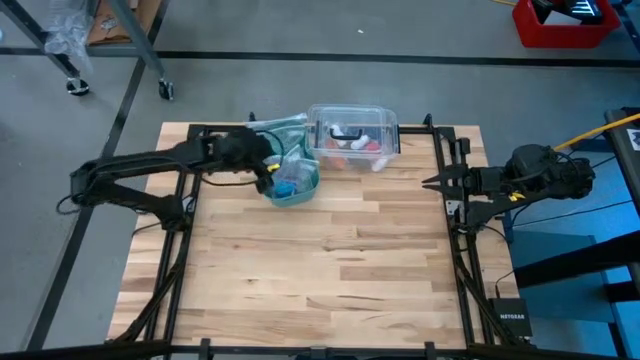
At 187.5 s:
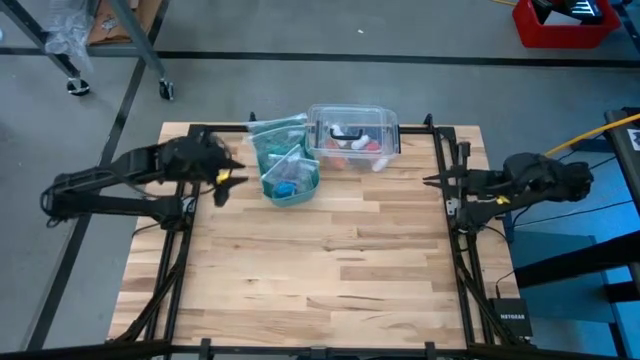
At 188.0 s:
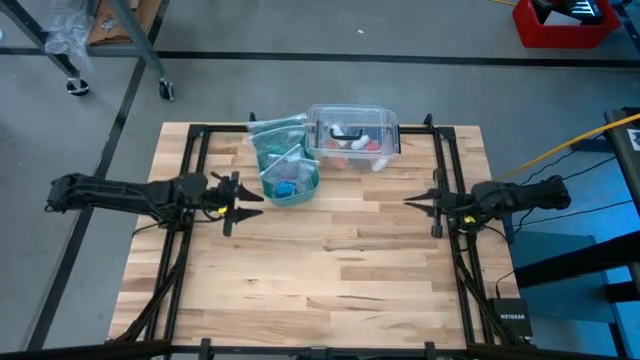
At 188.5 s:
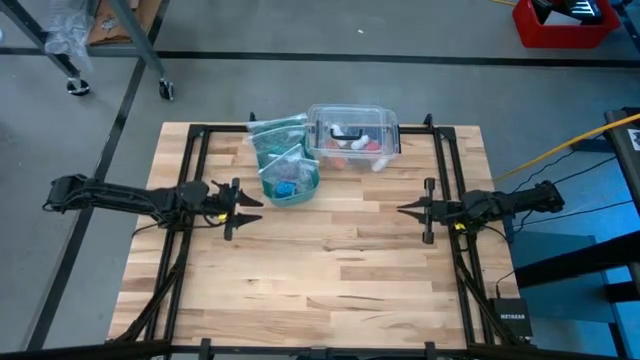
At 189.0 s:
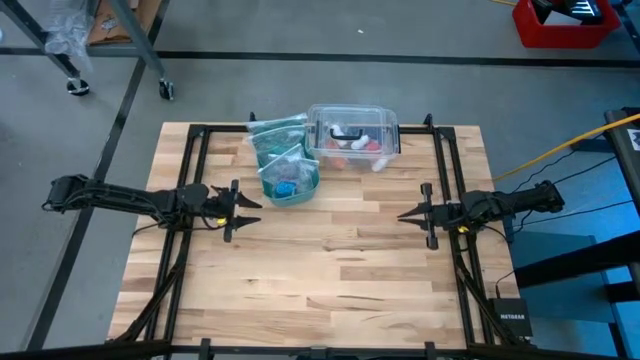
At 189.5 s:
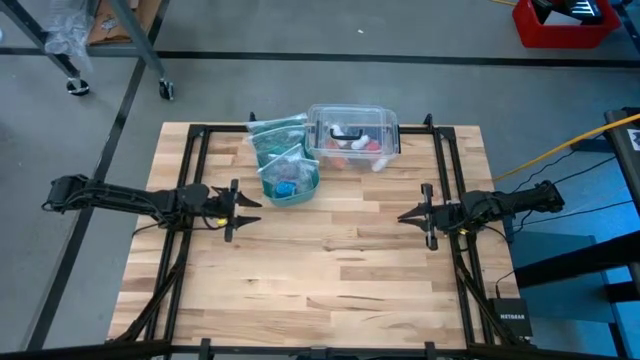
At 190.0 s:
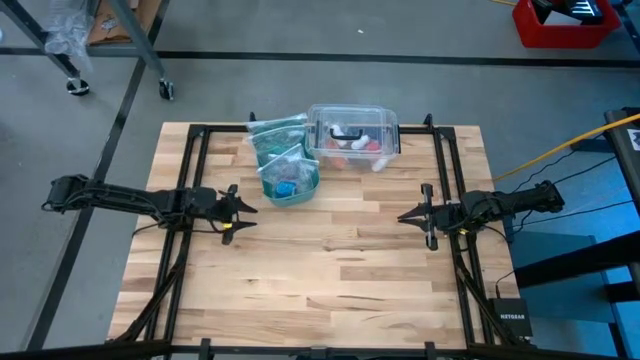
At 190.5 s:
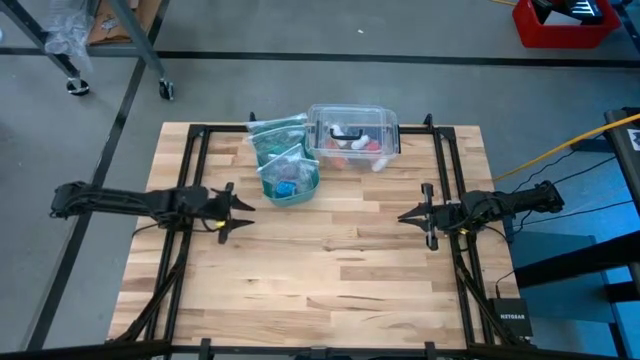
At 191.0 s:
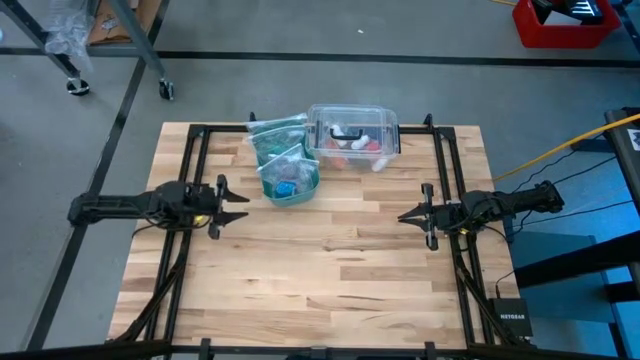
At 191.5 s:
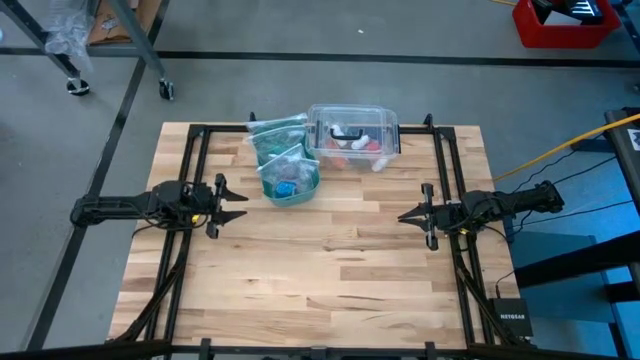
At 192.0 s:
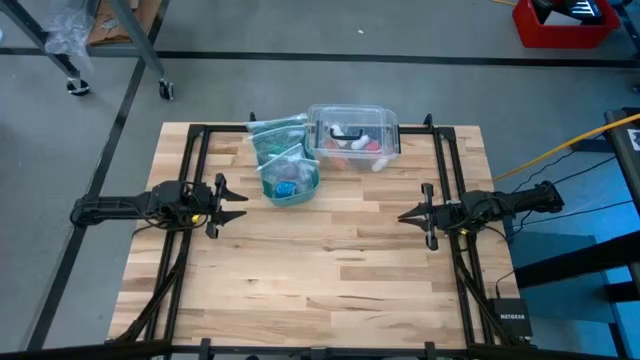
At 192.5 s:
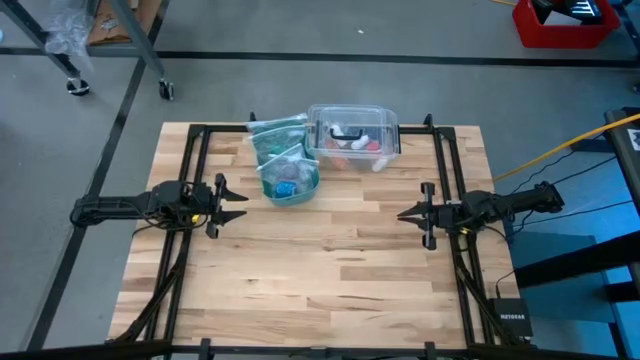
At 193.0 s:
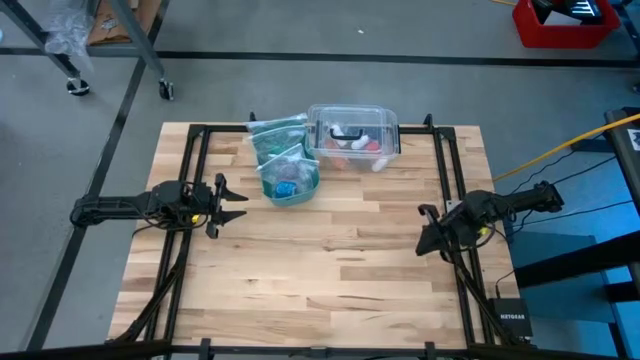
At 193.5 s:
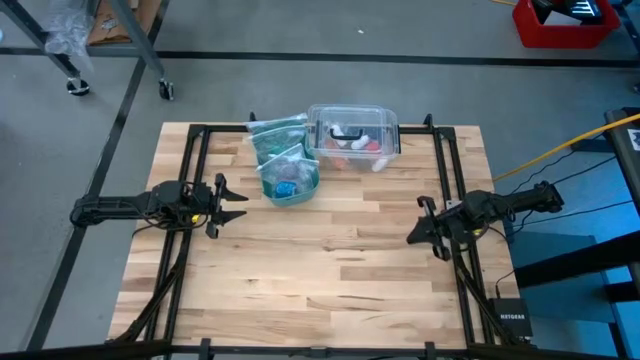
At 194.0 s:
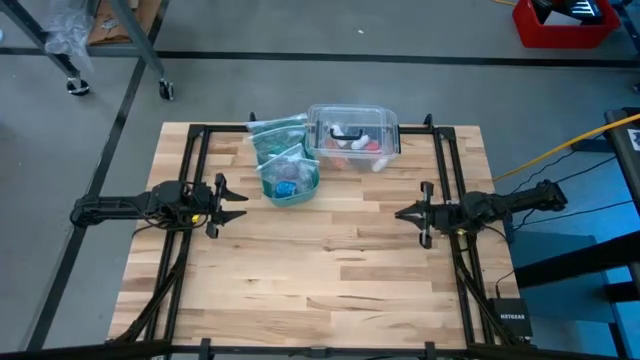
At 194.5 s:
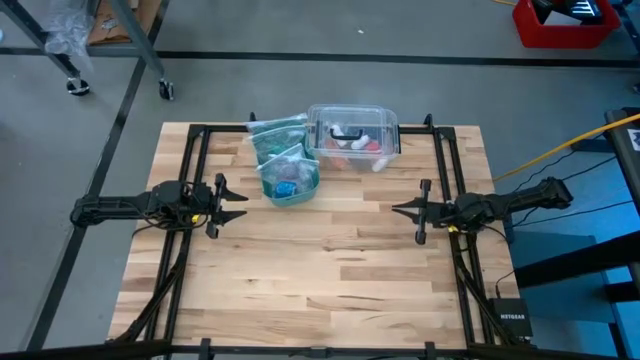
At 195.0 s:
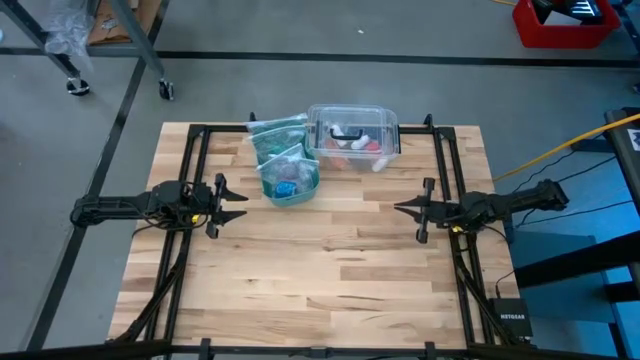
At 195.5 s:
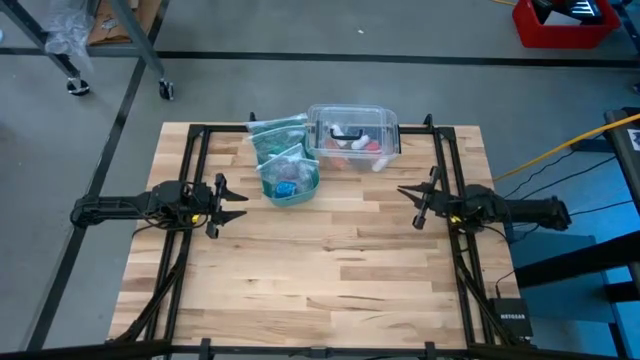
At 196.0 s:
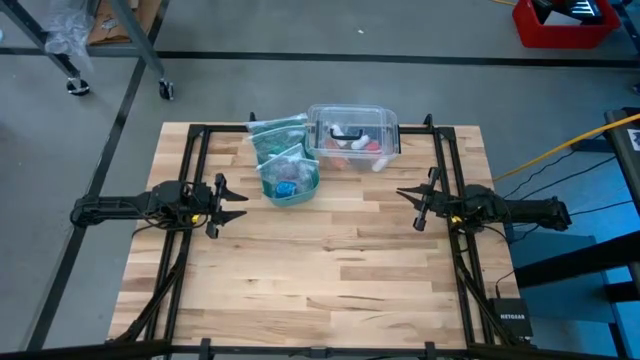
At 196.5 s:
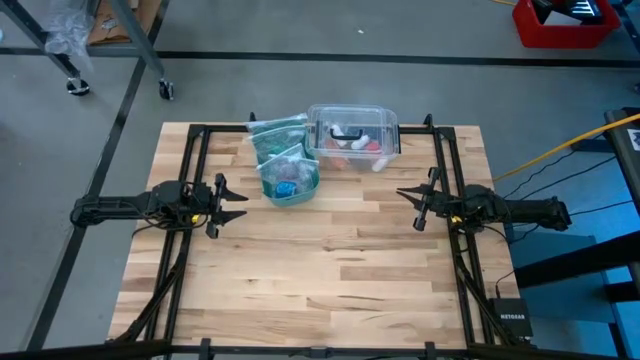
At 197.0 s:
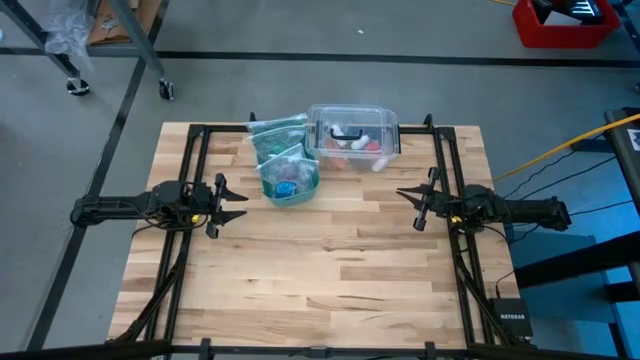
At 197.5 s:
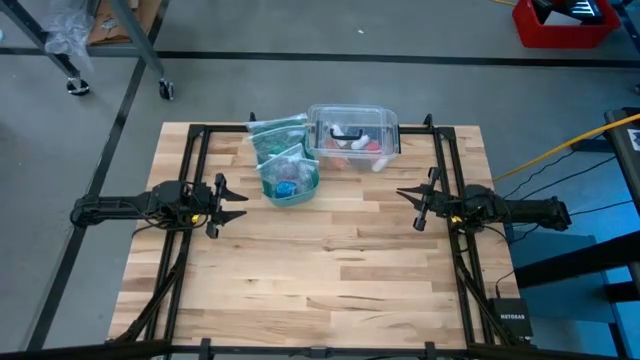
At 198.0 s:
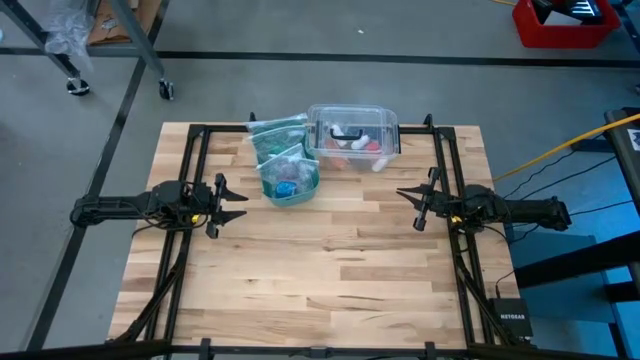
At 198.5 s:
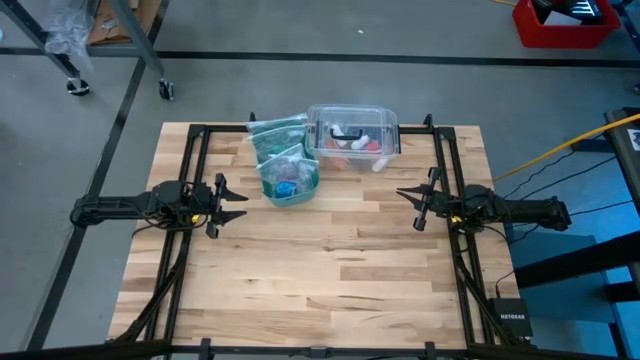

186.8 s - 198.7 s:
Task: Roll bandage
Return to Home Position

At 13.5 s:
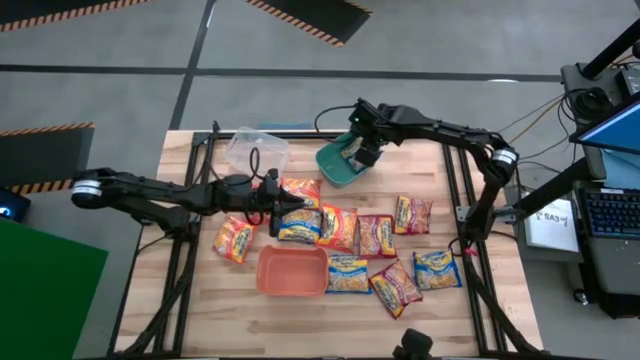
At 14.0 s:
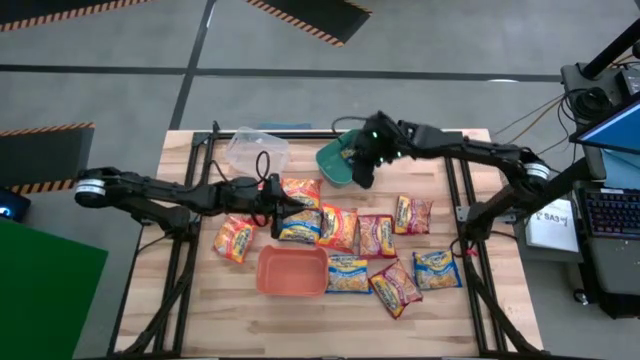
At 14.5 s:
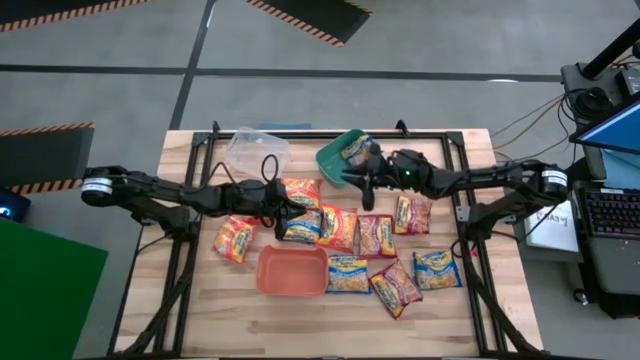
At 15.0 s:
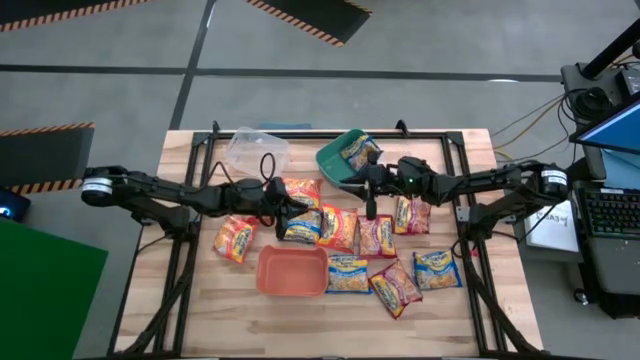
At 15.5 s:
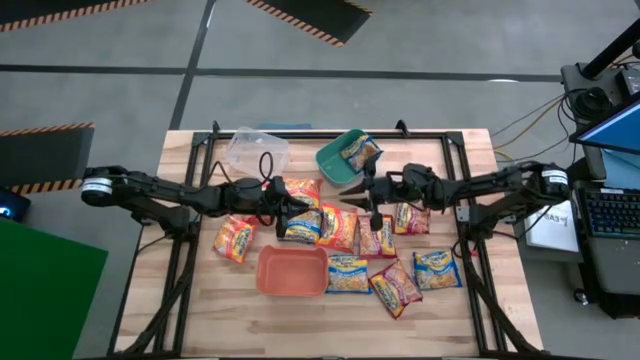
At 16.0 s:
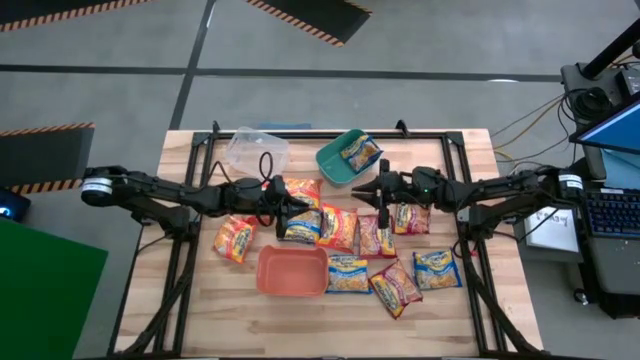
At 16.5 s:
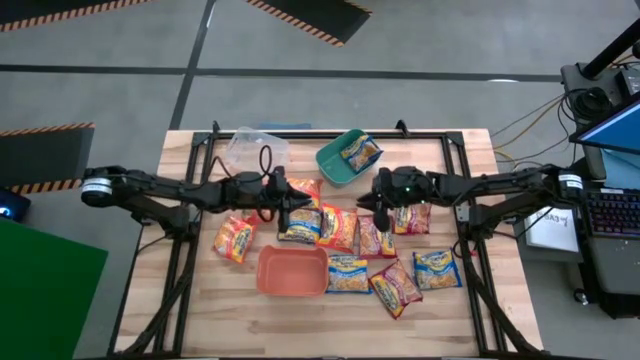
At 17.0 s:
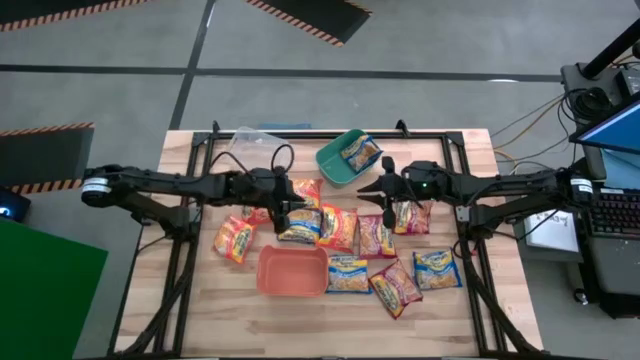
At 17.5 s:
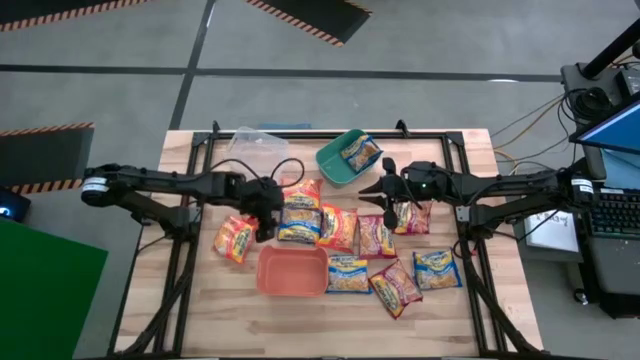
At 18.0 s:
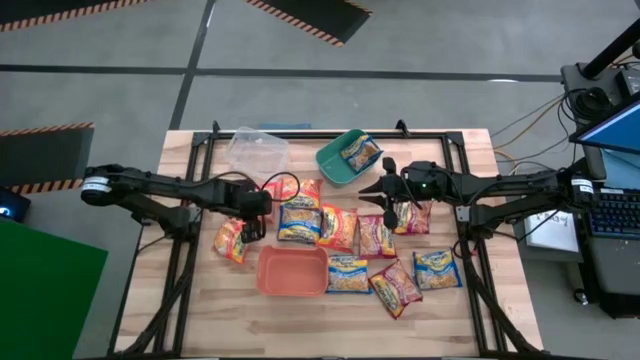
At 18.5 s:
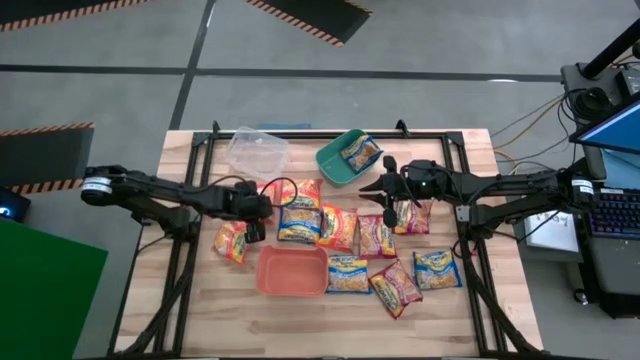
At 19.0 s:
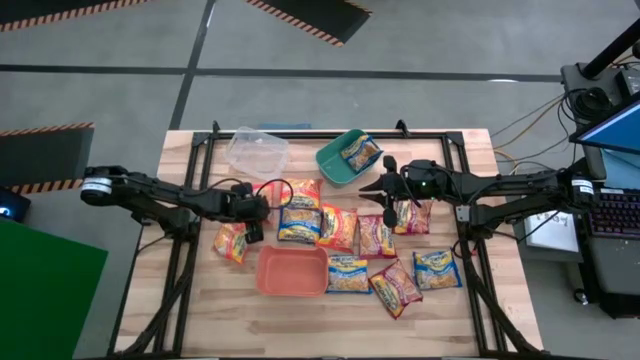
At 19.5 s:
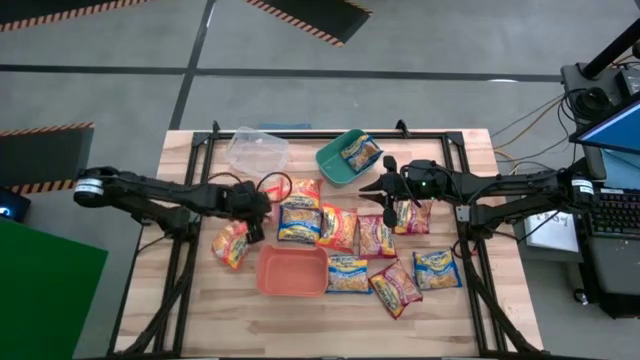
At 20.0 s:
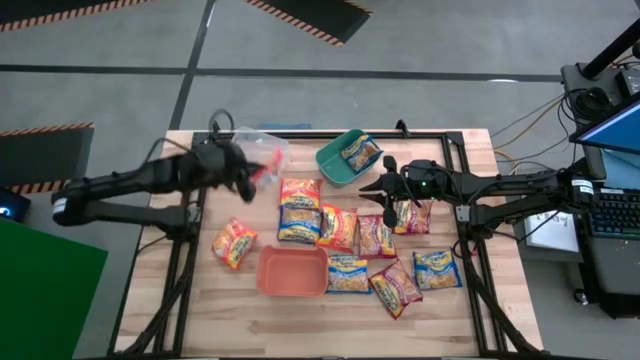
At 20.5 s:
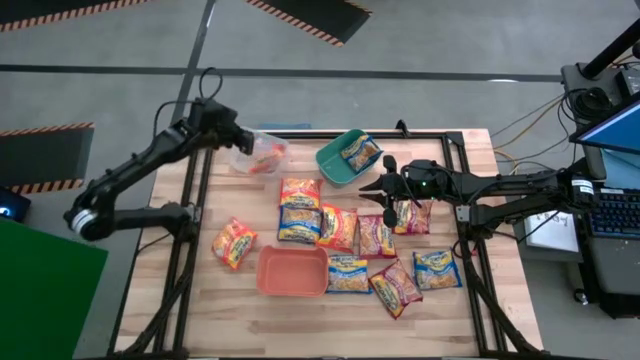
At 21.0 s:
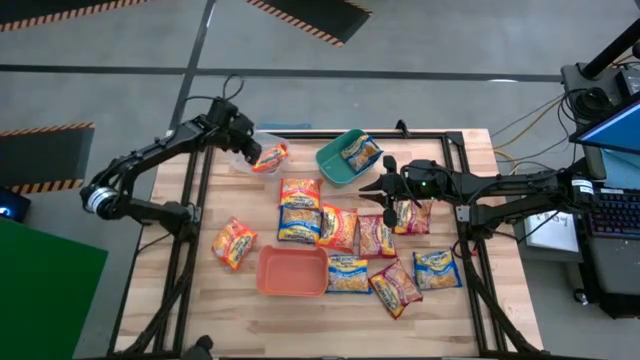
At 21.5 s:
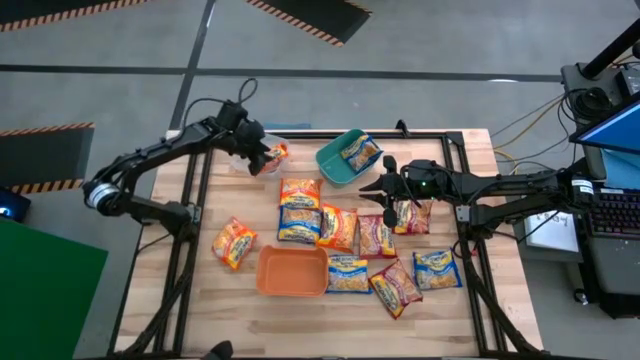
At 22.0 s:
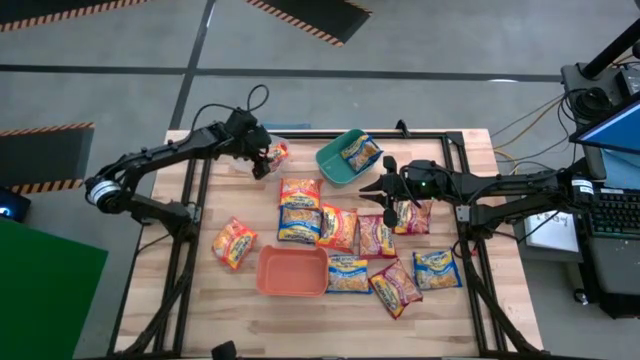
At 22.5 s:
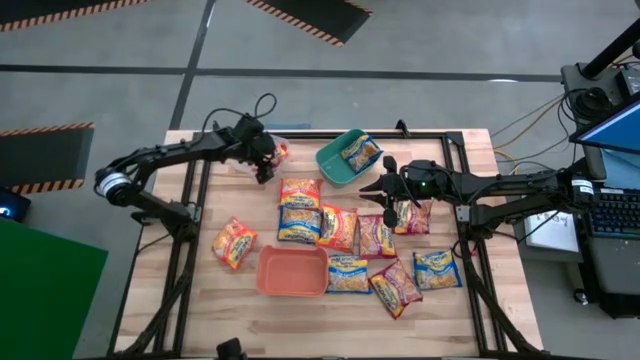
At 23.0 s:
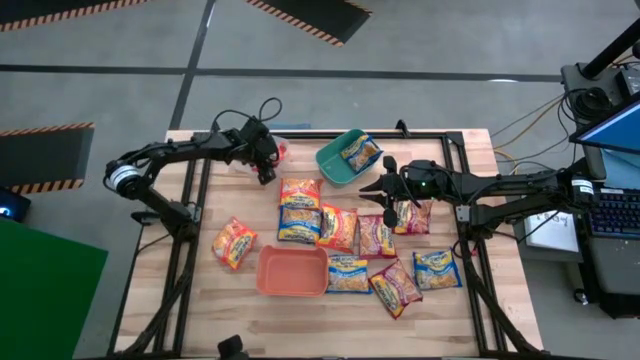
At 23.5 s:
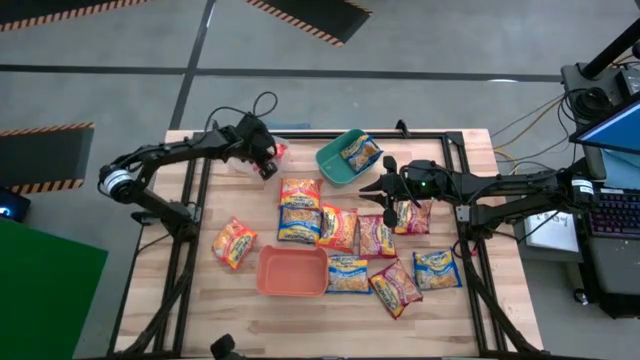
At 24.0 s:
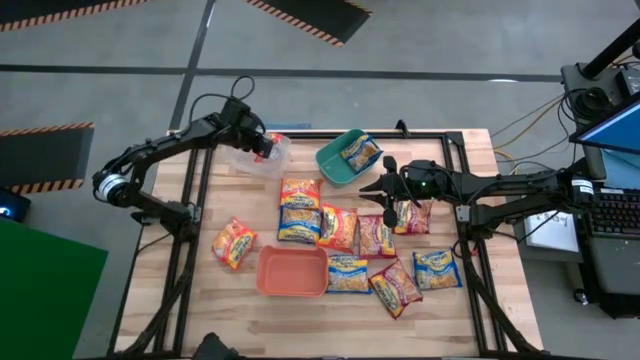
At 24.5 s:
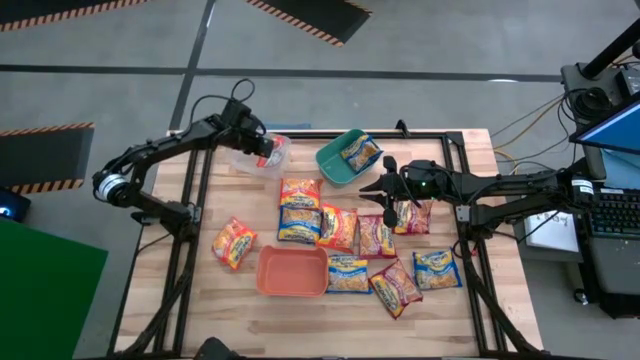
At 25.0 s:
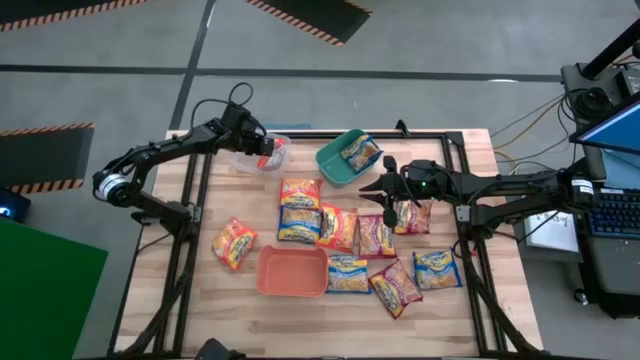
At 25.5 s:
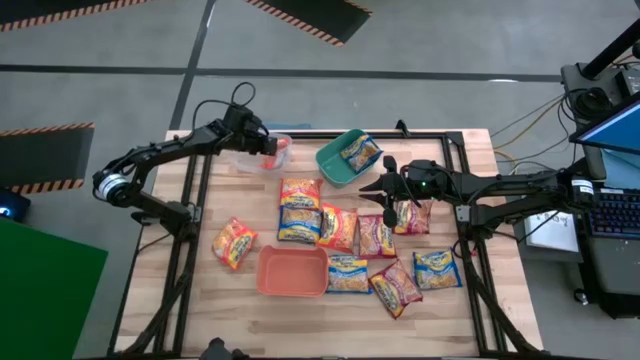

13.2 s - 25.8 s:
Task: Sort Maruchan noodles
Put the orange noodle pack into the transparent bin
